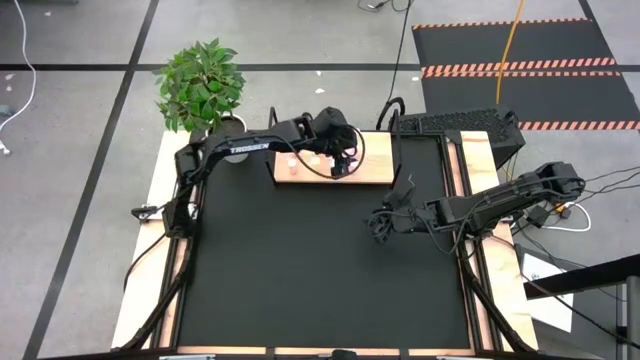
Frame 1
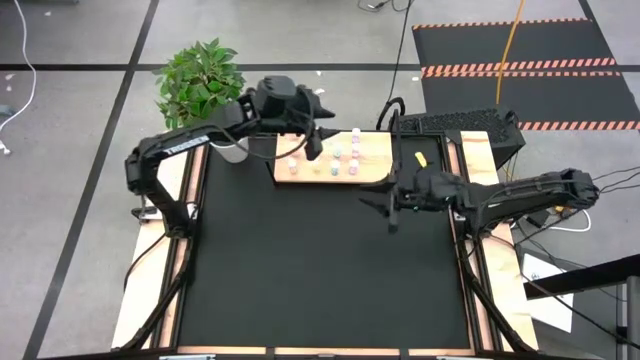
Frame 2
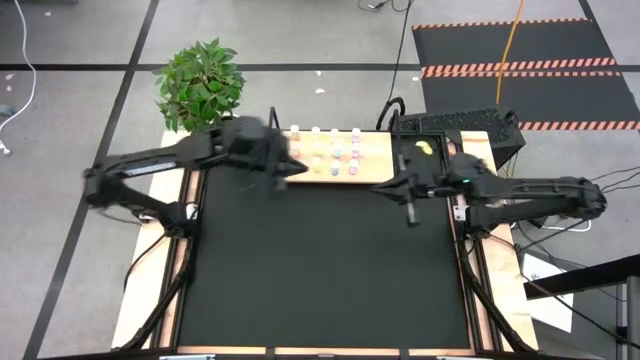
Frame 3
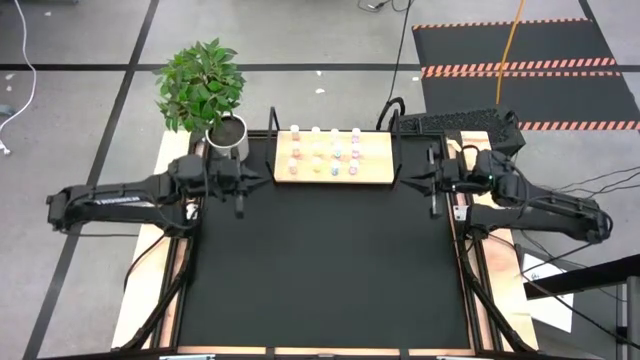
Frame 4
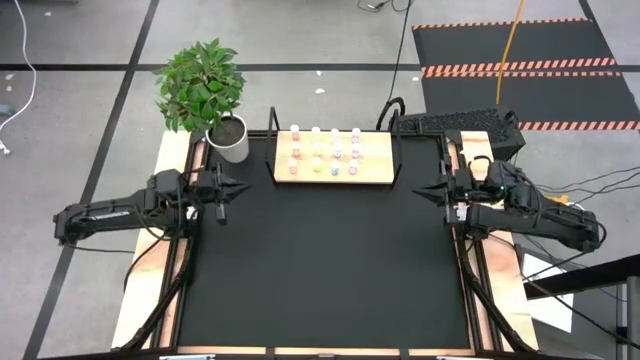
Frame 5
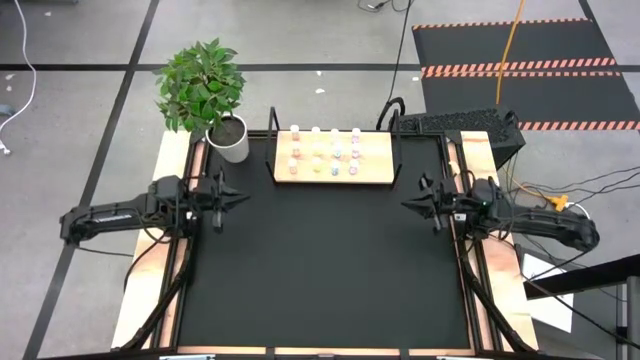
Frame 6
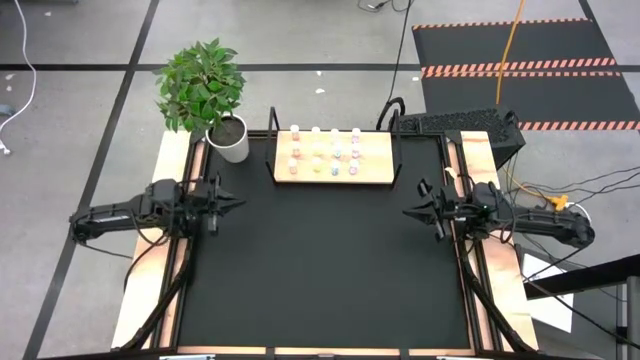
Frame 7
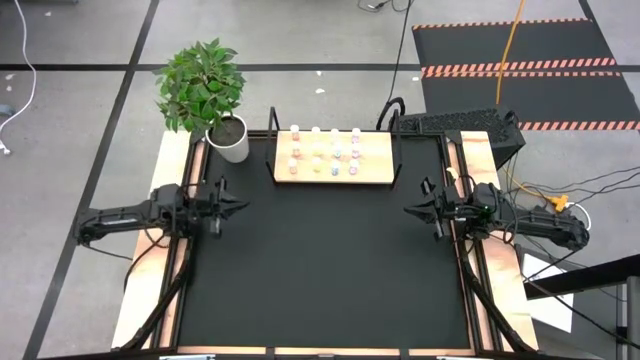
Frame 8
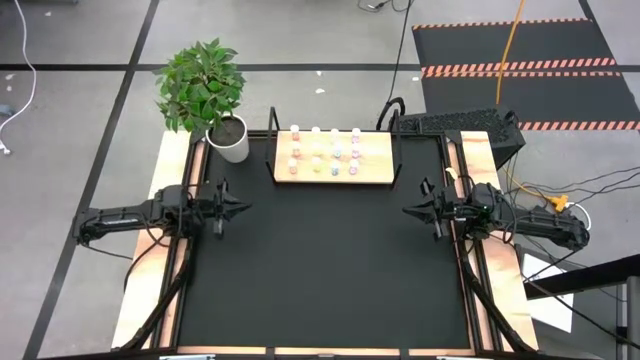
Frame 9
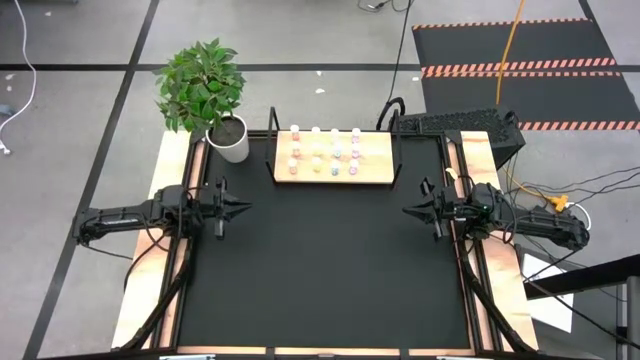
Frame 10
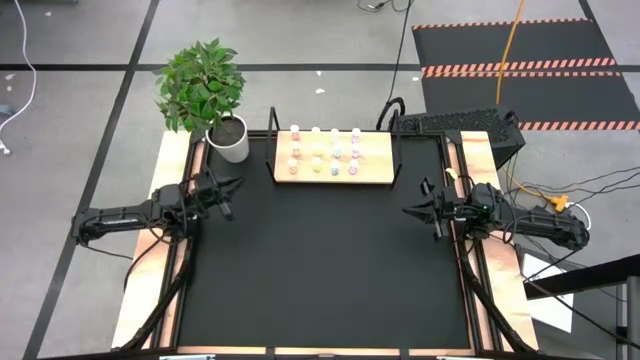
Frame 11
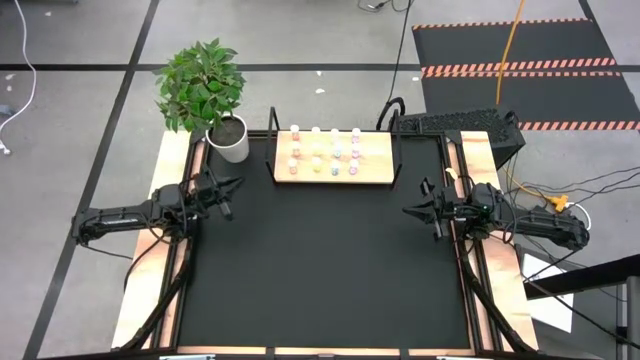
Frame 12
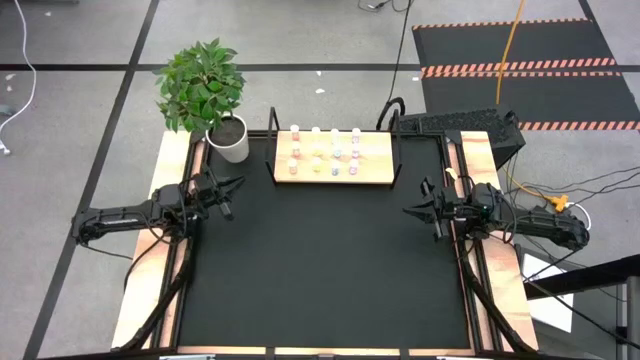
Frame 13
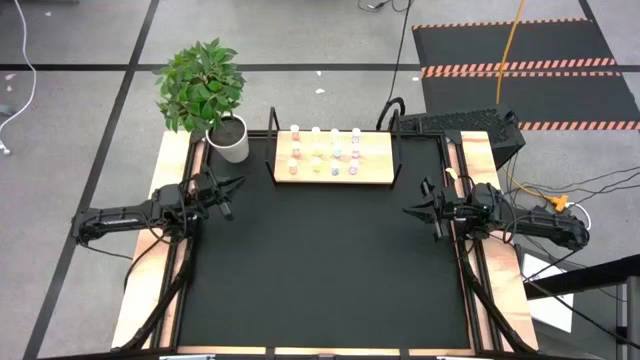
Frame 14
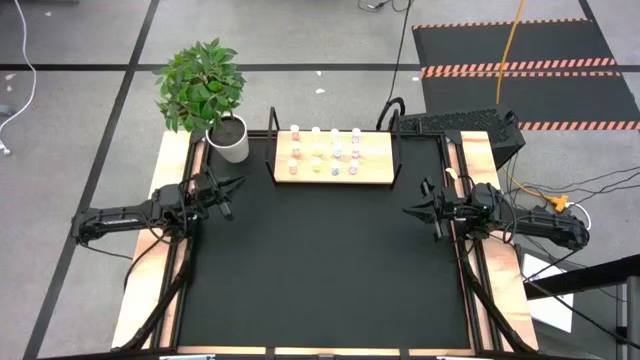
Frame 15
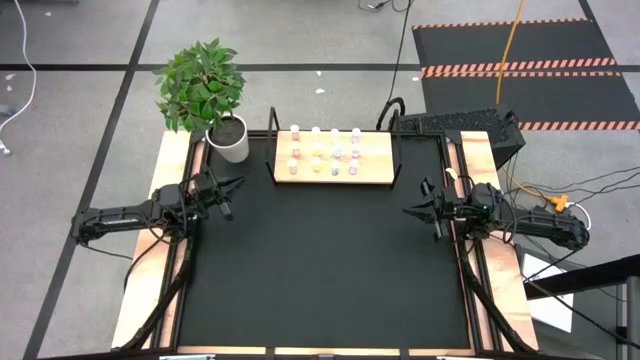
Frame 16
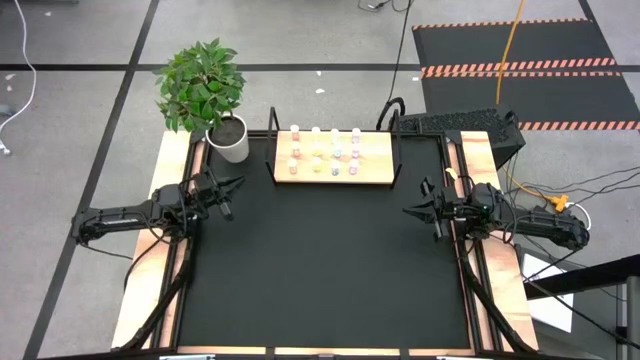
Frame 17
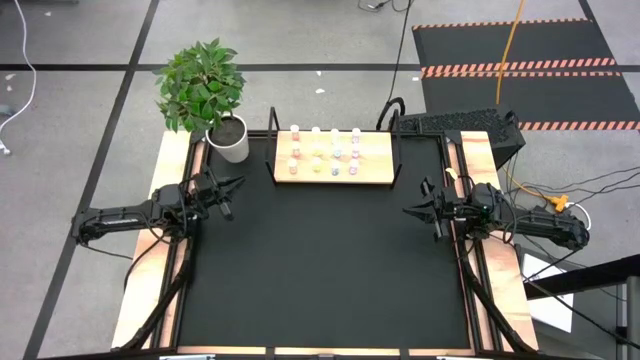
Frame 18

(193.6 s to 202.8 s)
Task: Pick and place medicine bottles onto shelf by color
Return to Home Position

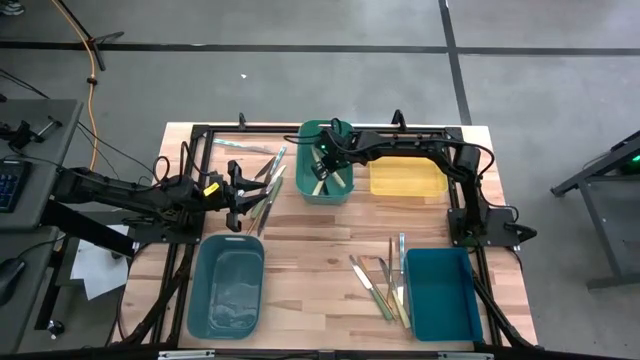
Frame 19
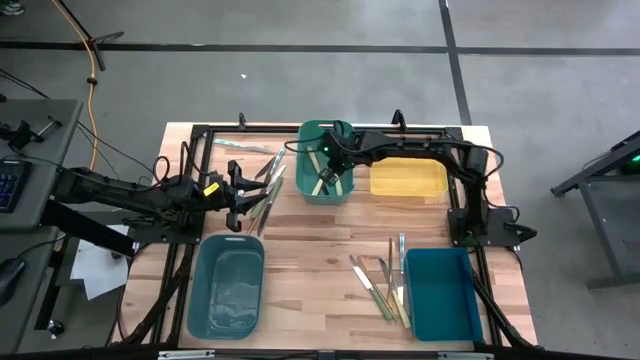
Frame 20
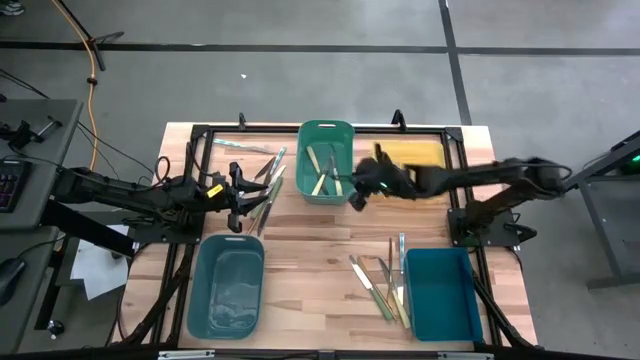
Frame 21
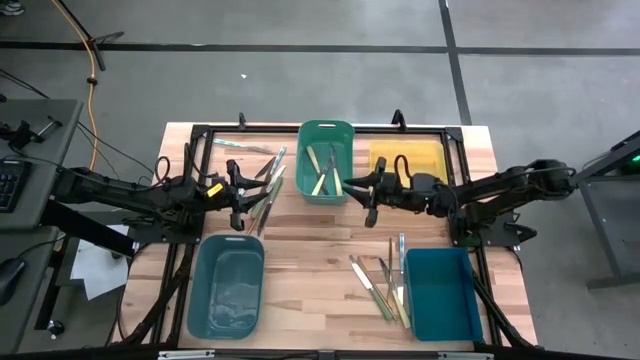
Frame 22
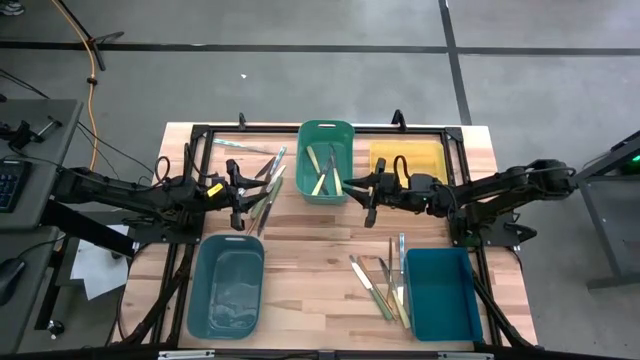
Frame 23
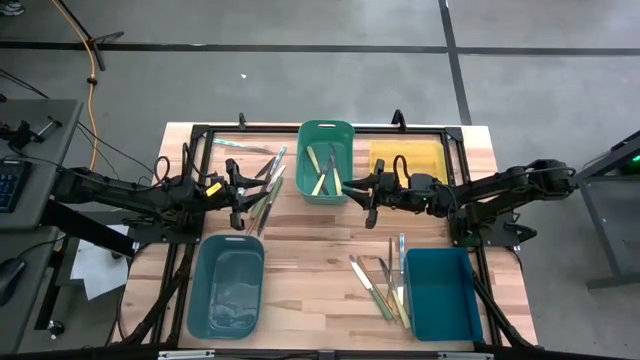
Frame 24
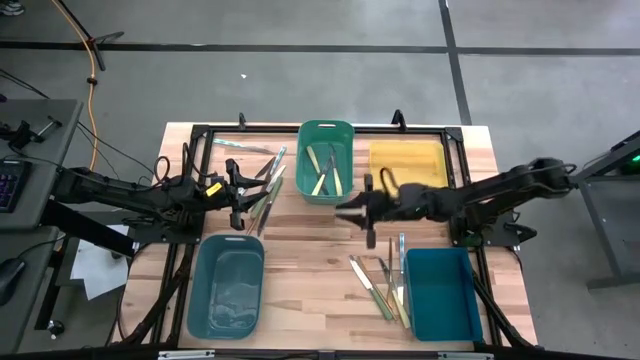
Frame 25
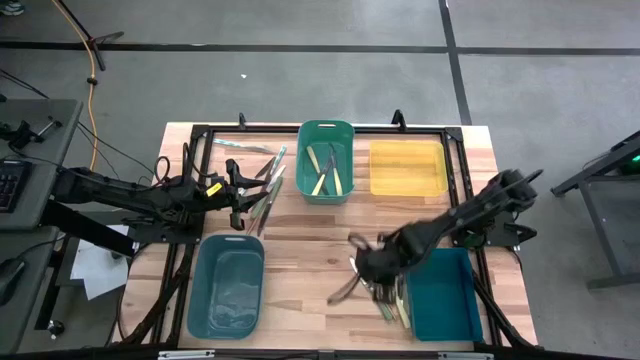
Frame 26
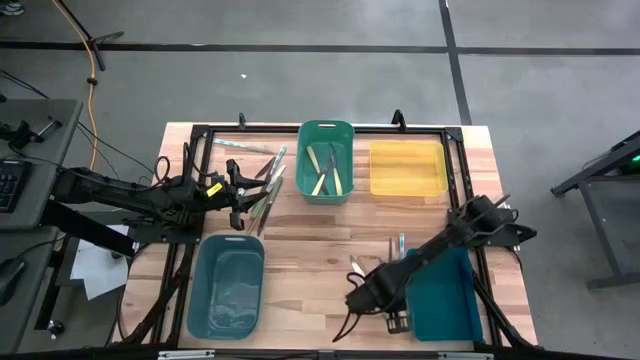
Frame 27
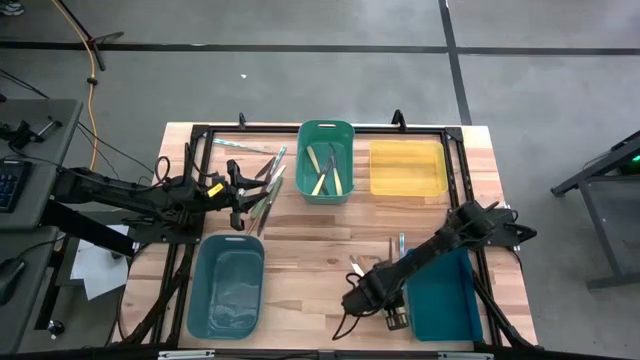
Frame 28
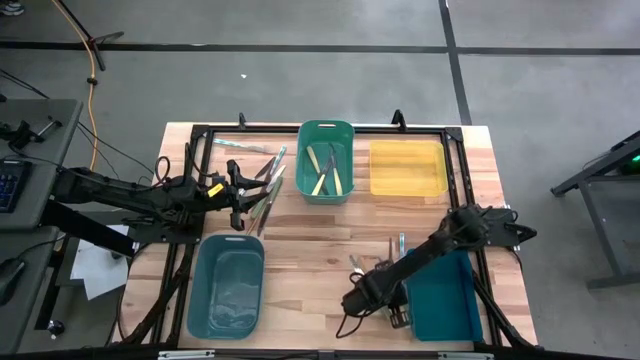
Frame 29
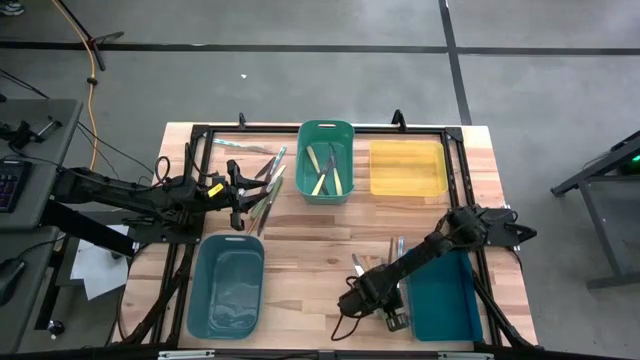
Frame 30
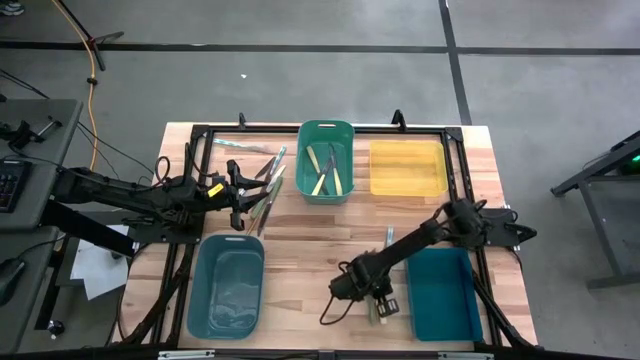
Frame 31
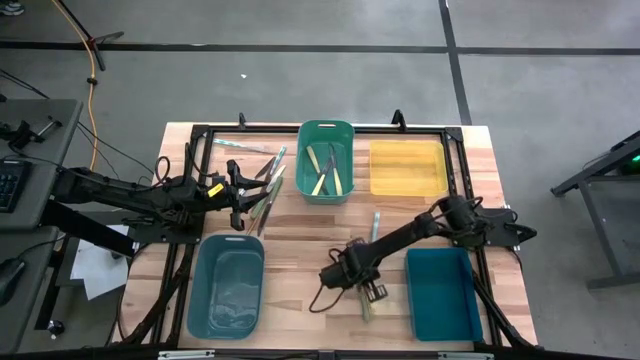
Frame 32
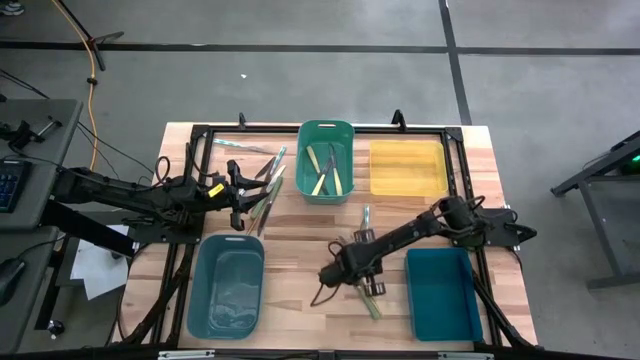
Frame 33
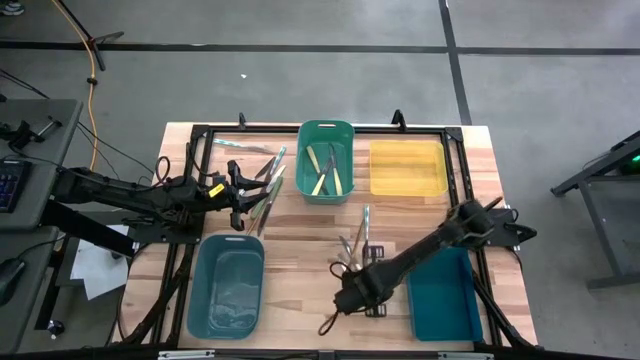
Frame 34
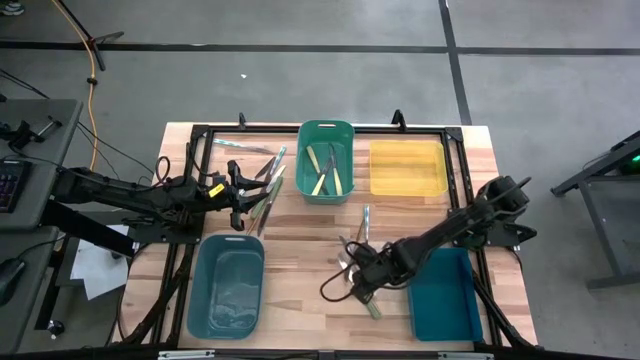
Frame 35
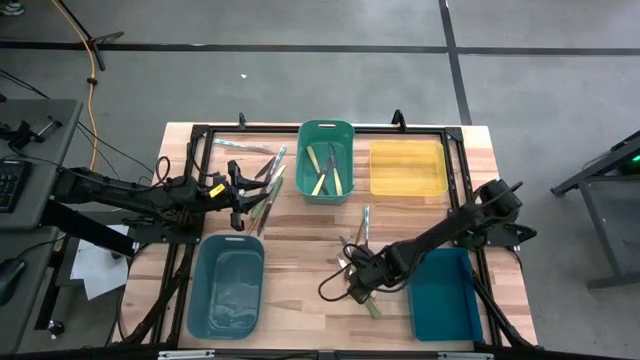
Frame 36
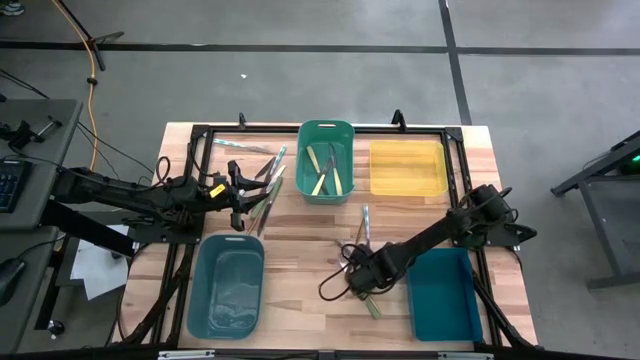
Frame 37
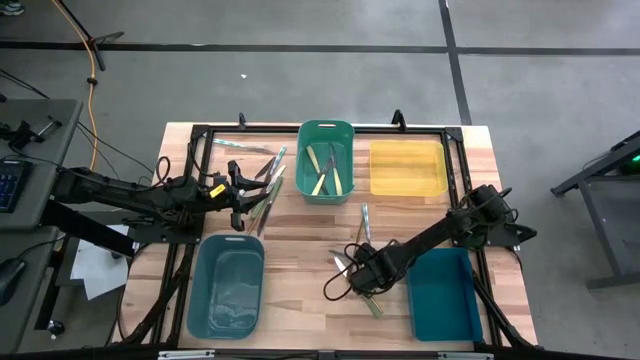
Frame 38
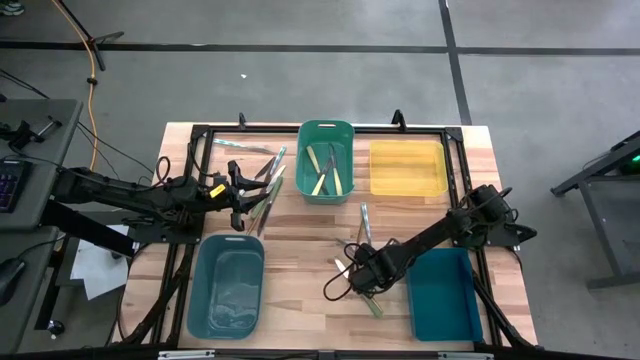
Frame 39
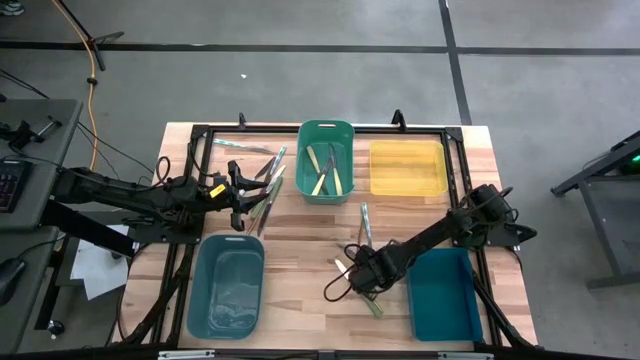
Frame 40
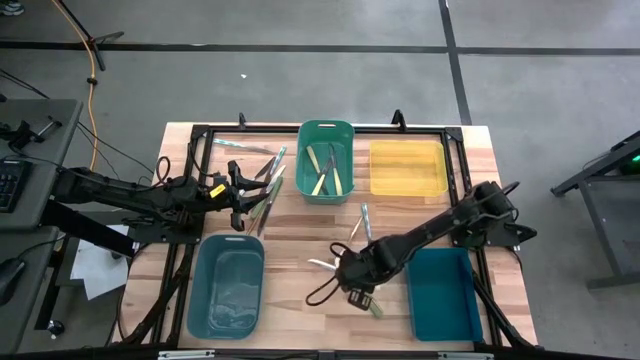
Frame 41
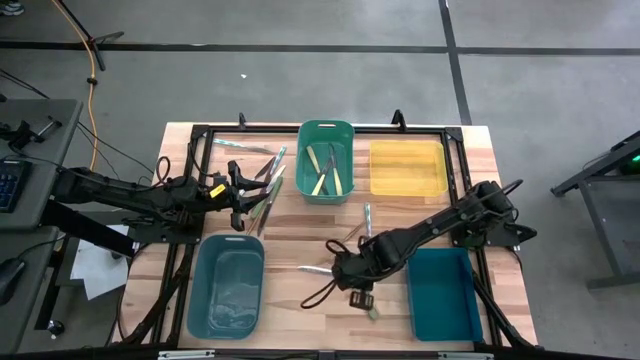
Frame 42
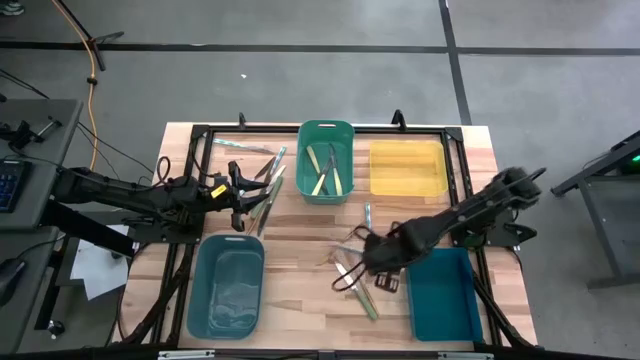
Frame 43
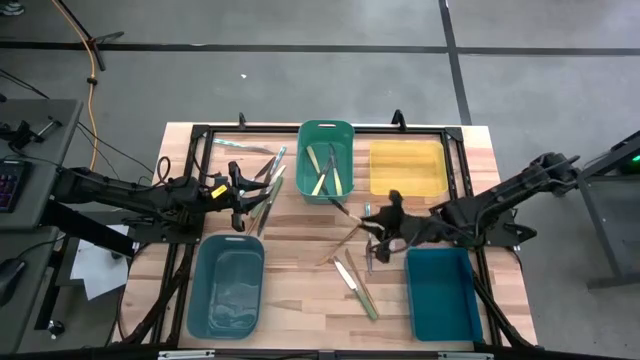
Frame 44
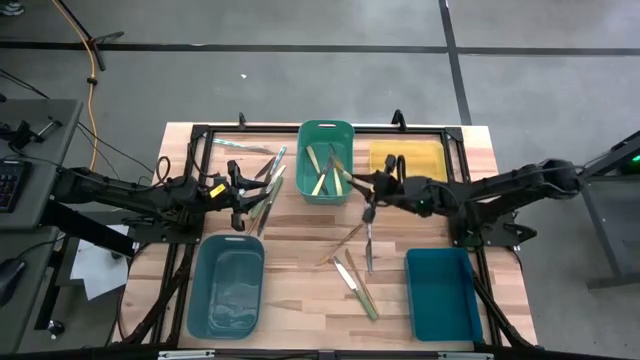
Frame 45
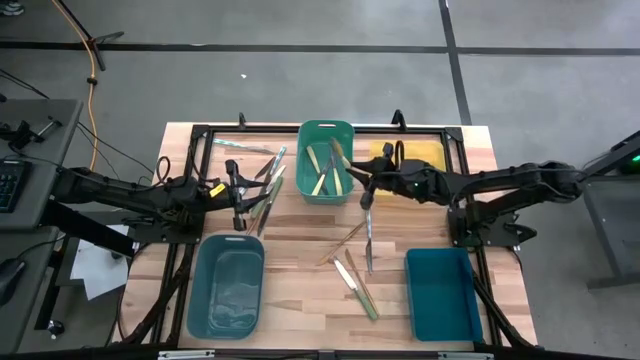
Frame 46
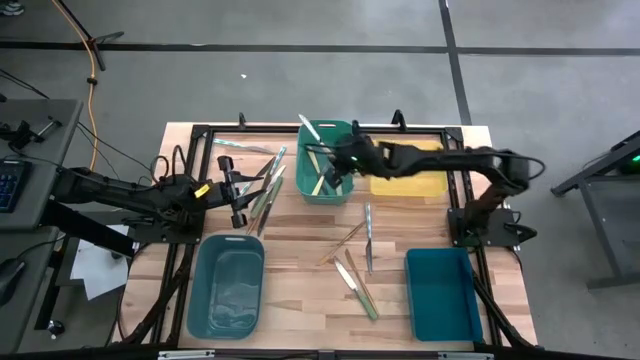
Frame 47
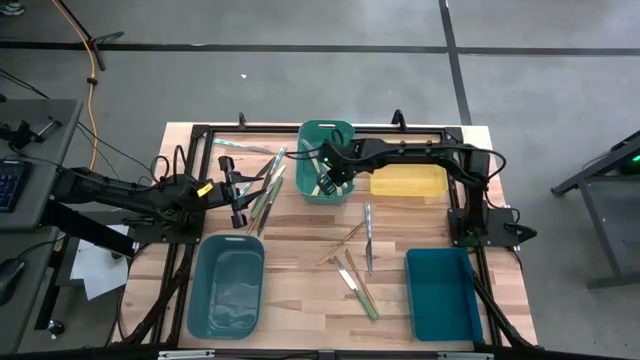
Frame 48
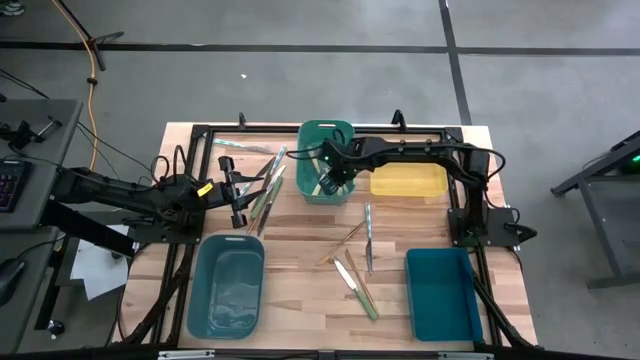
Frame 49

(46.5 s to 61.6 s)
Task: Sort silverware by color (type)
Put the yellow knife into the green bin
